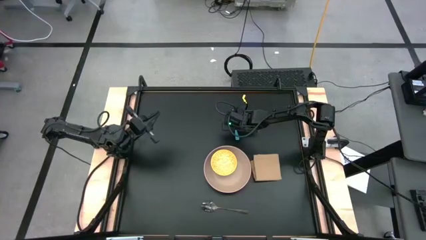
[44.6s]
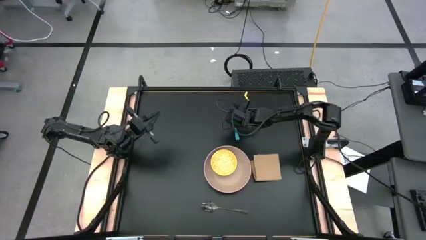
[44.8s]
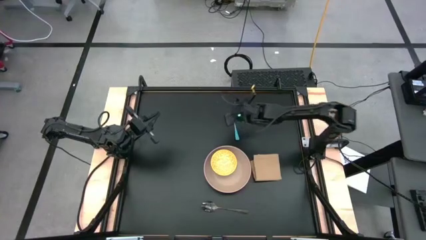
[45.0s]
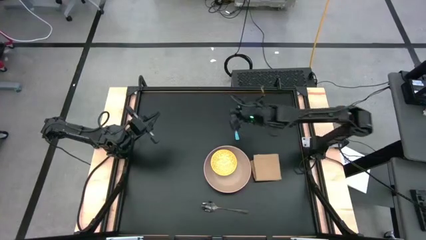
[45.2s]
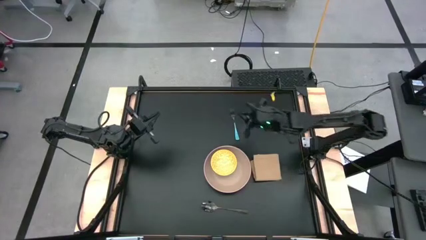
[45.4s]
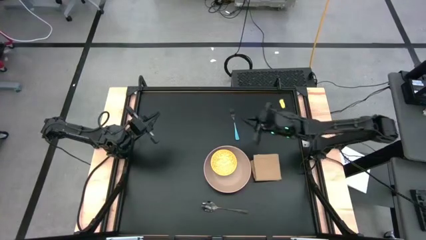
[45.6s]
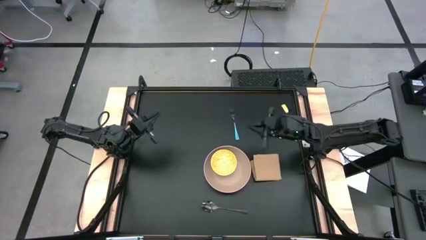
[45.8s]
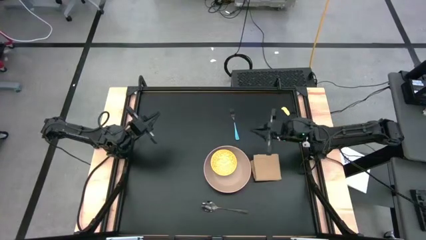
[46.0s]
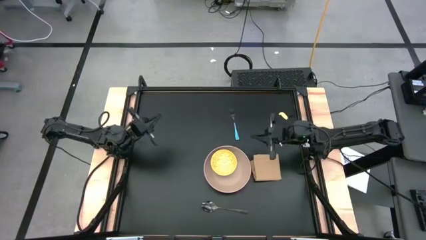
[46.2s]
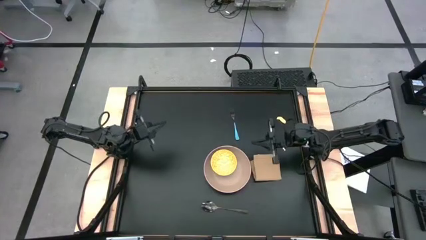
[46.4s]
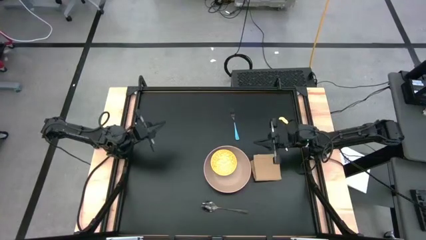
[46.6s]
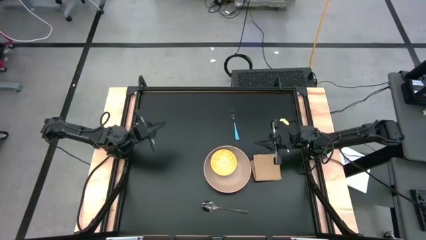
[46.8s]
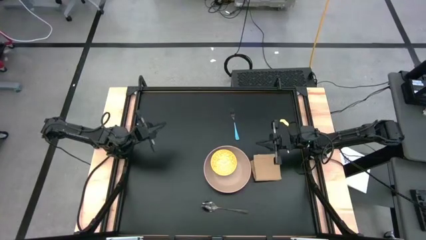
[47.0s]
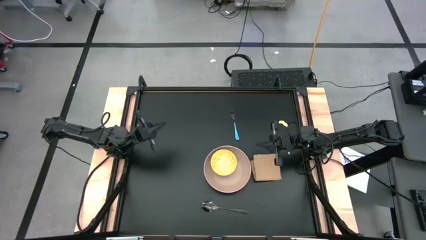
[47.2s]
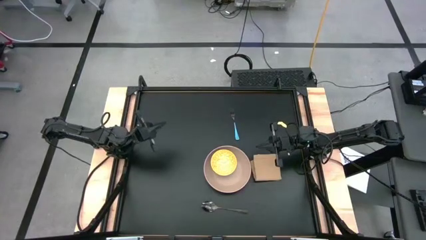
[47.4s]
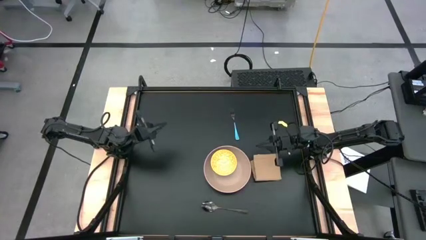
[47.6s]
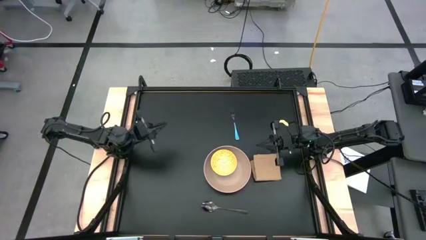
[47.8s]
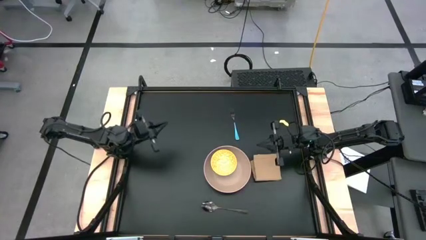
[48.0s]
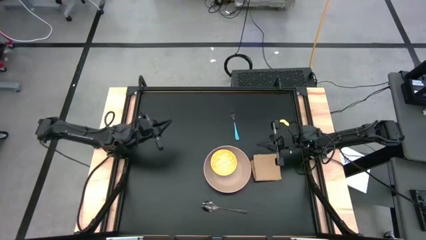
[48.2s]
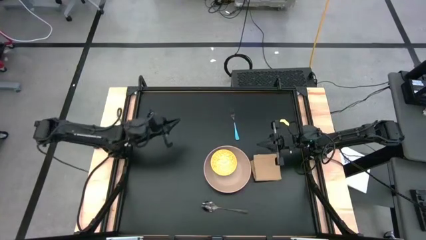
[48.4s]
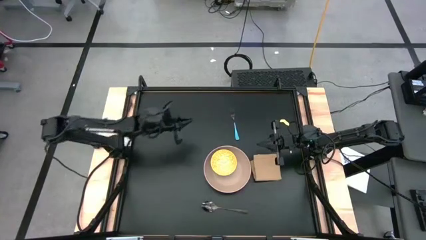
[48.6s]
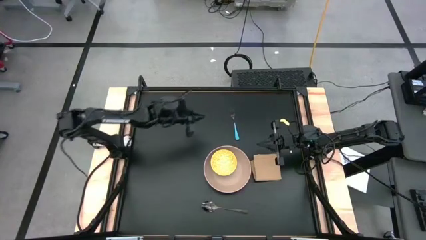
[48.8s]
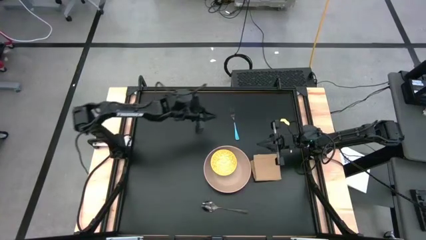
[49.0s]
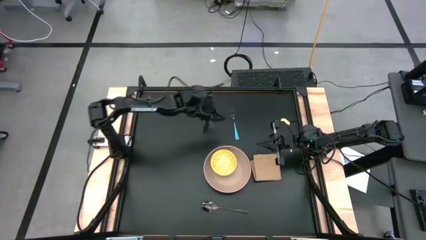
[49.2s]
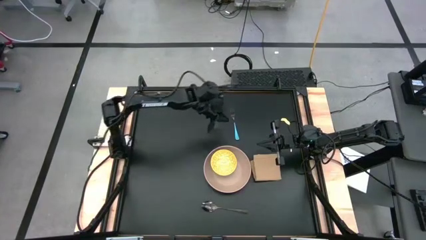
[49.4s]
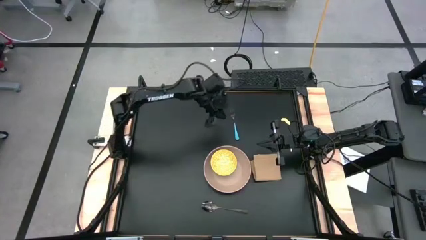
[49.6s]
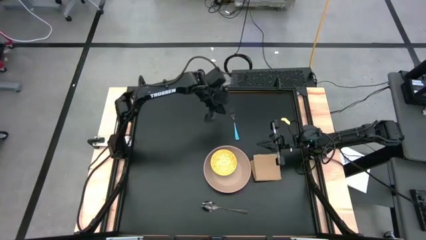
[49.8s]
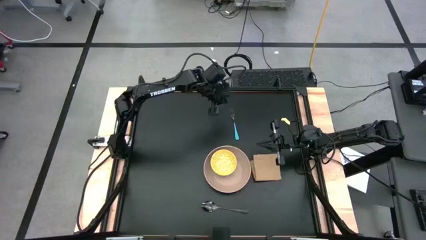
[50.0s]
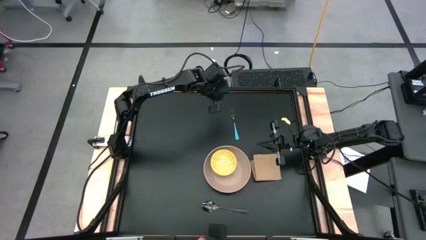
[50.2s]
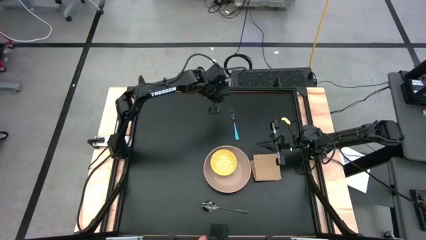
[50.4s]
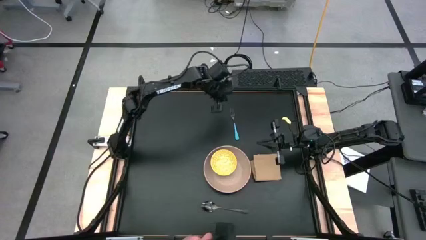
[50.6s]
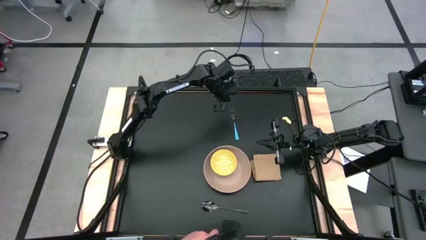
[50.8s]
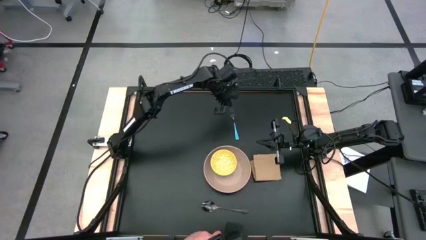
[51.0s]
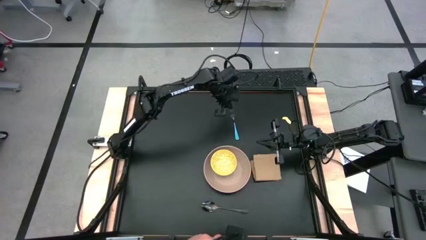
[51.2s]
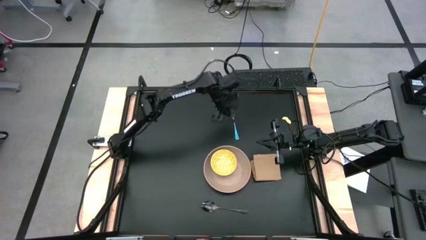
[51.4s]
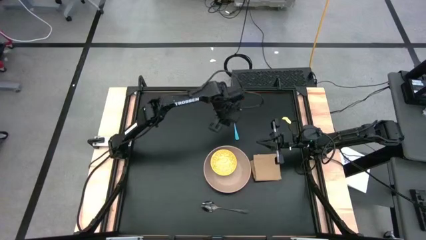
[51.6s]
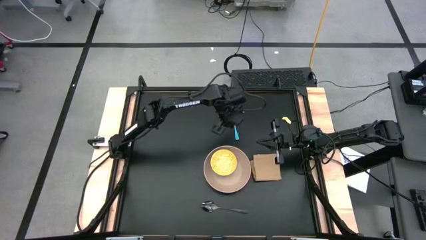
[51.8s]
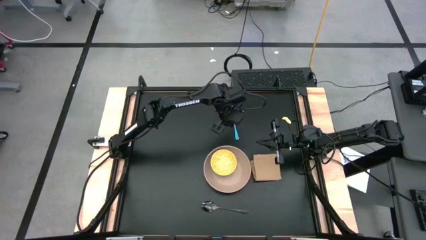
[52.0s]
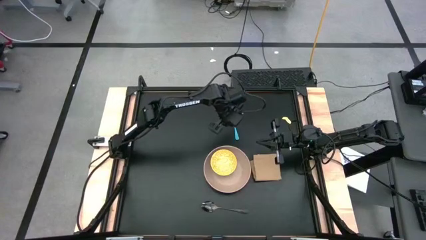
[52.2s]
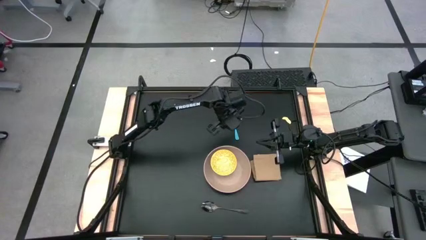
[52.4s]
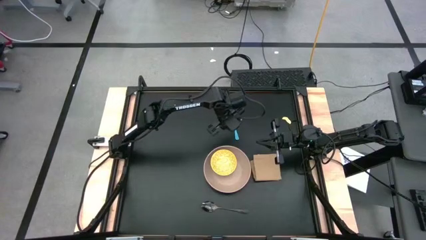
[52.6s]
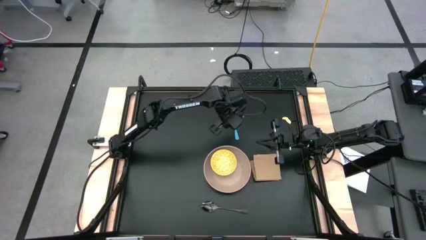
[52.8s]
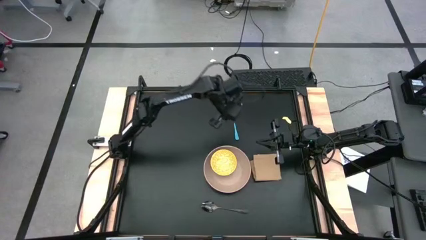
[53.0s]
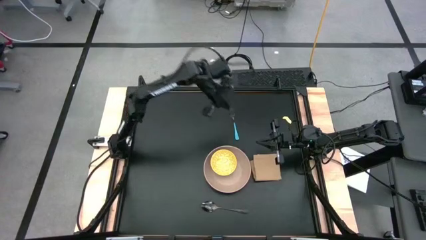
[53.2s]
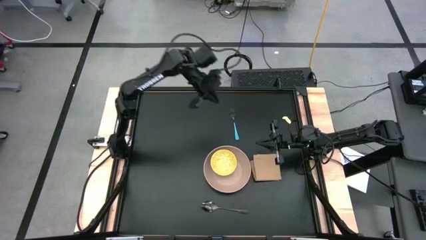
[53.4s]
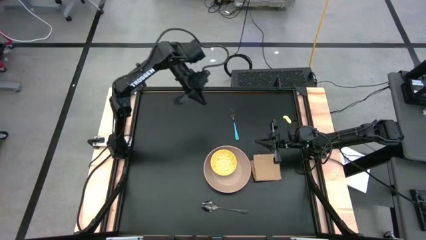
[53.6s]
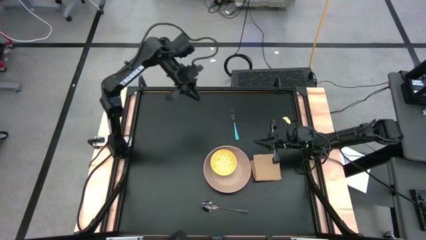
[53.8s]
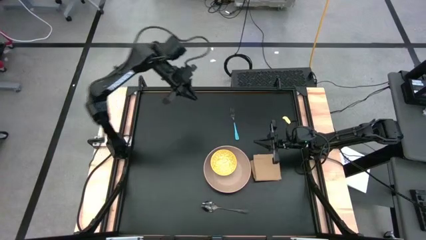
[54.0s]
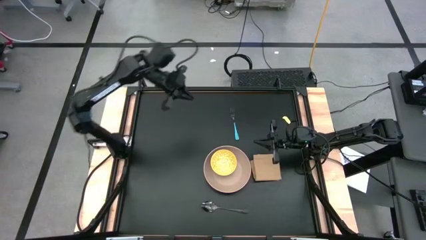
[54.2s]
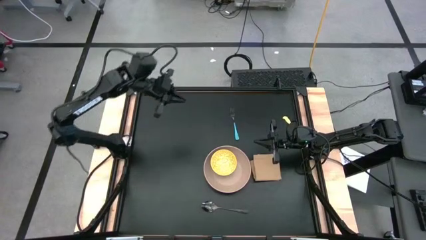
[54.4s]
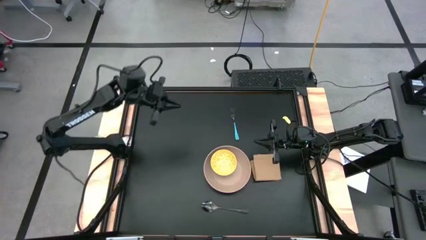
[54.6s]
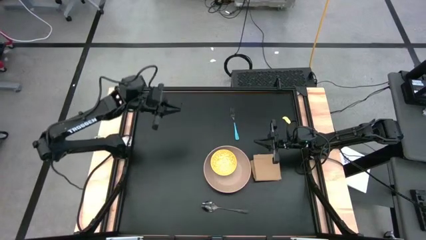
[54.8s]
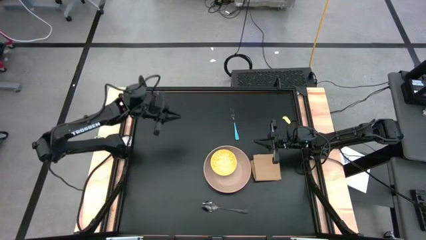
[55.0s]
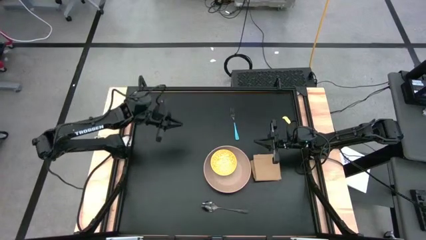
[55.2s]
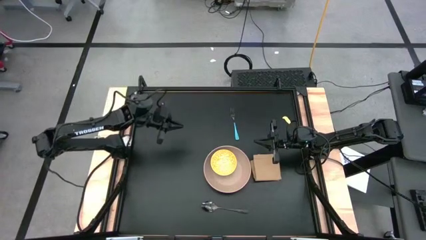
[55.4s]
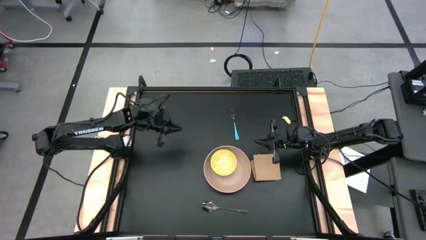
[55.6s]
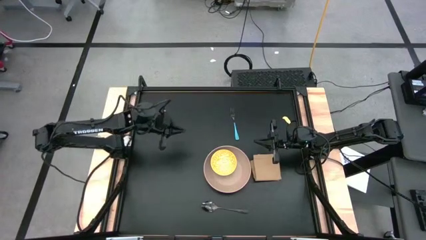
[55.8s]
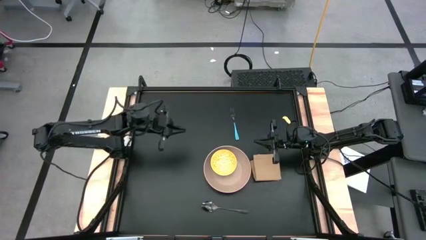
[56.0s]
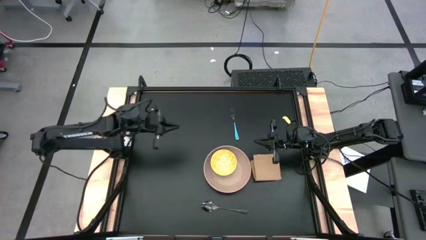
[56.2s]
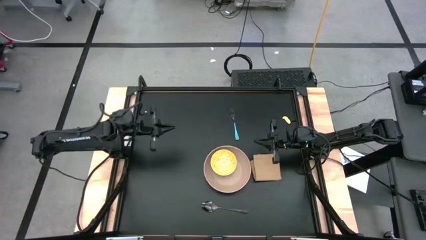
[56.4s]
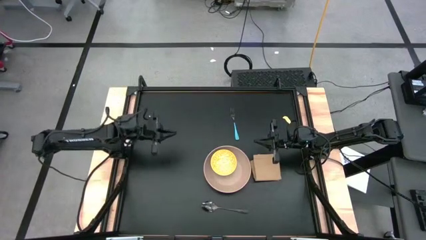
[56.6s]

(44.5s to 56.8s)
Task: Set table place
Adjust the brown plate

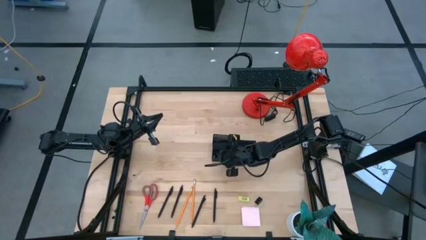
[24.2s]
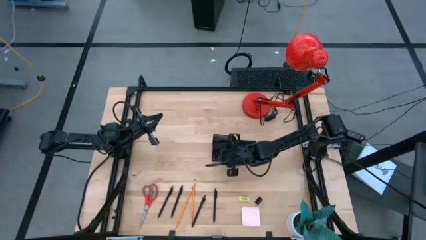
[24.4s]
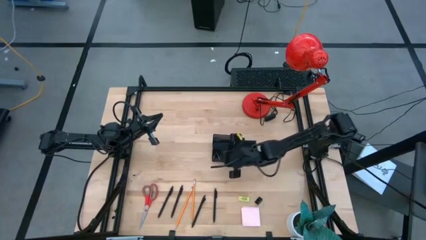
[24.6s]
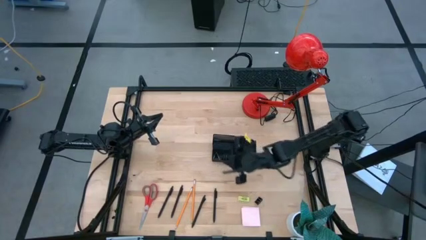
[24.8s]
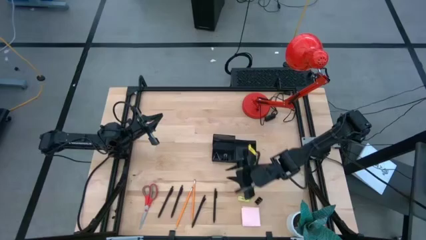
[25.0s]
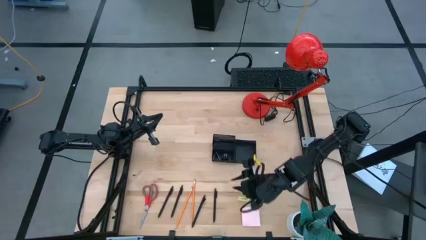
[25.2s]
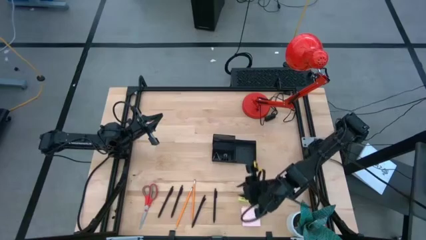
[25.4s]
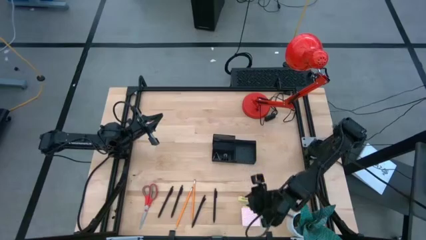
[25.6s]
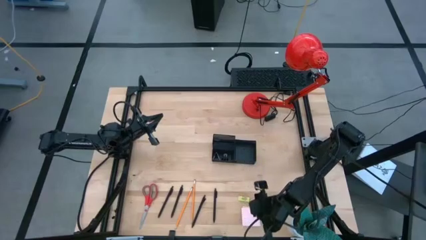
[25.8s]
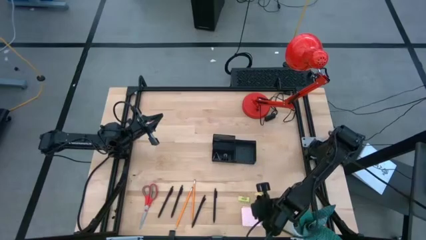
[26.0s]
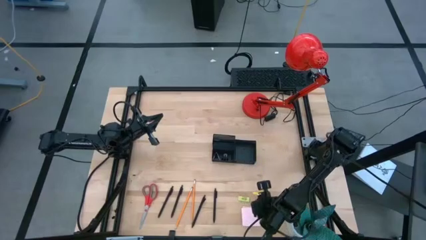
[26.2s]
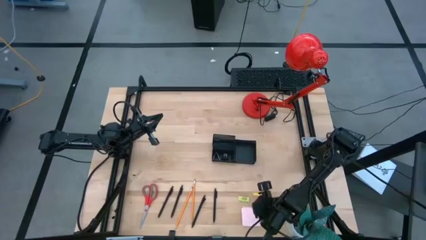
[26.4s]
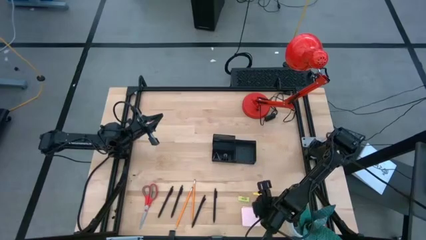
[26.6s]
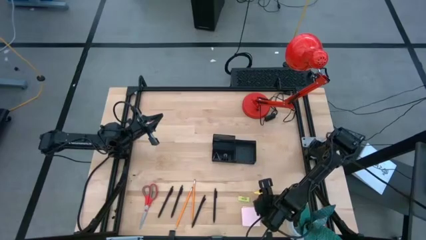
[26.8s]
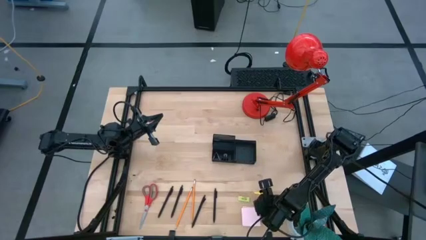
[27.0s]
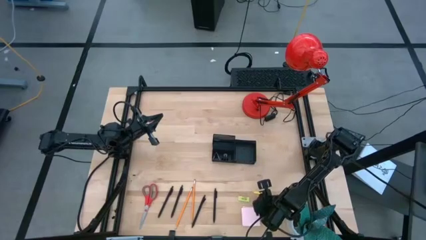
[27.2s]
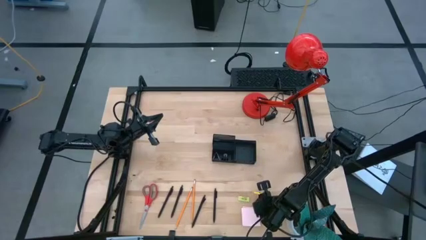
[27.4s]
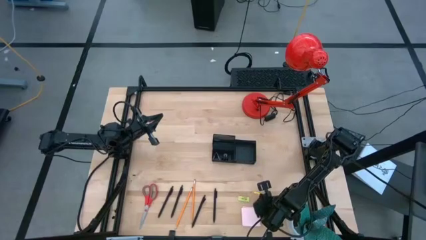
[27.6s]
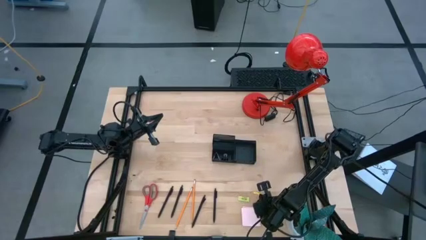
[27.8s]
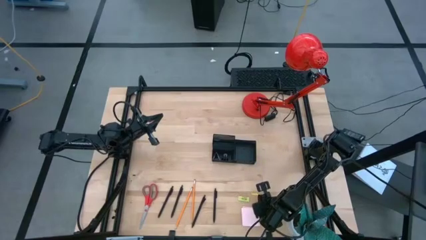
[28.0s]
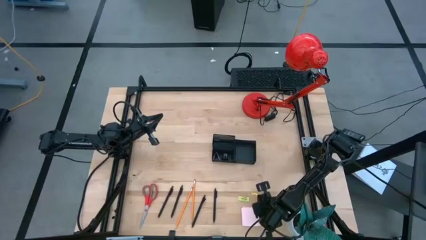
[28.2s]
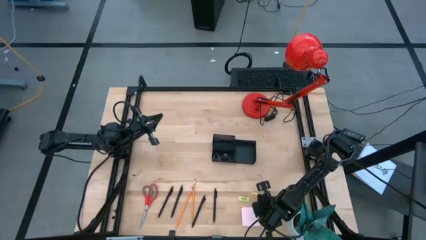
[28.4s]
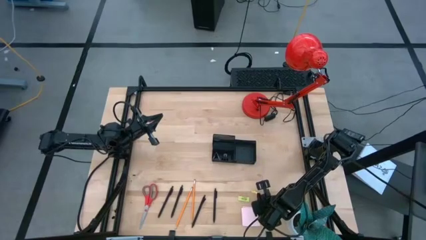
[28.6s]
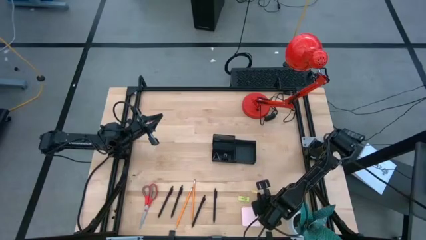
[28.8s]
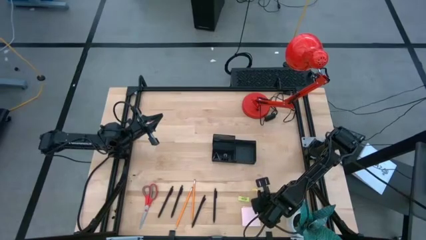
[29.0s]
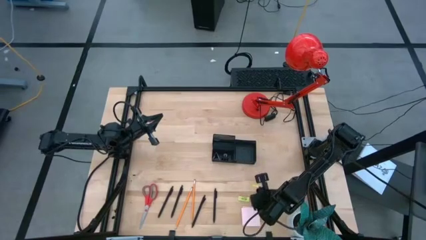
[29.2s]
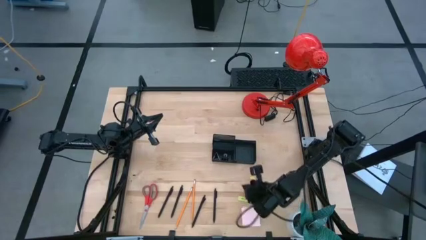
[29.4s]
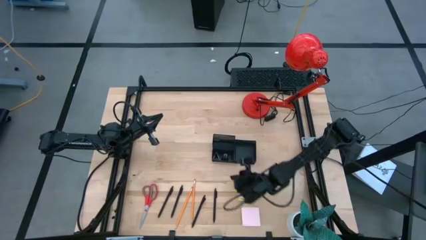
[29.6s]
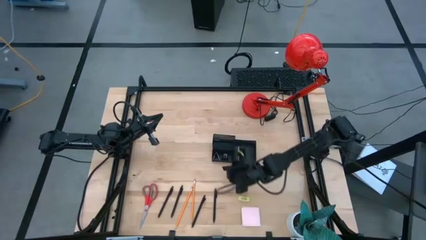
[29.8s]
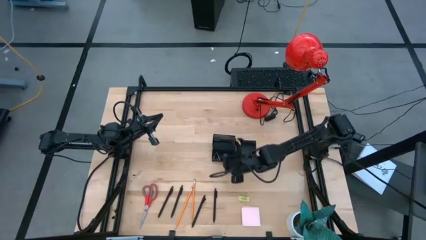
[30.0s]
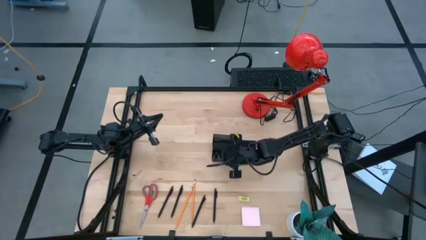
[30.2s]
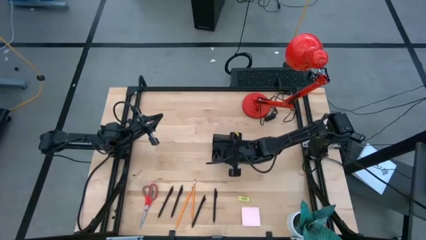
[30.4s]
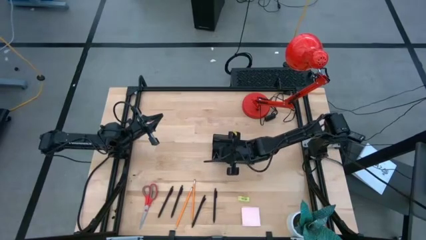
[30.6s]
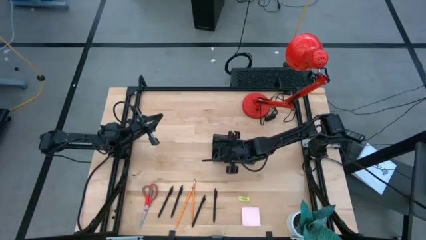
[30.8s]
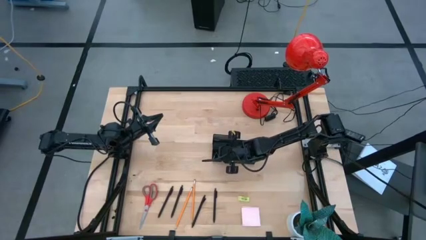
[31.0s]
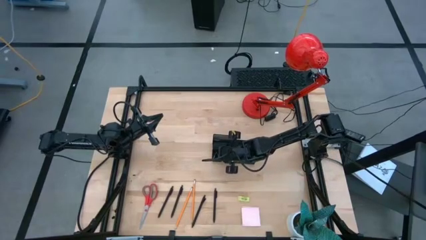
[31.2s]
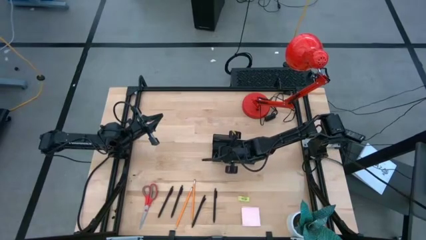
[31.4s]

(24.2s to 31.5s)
Task: Pick and place office supplies into organizer
Put the black binder clip into the black desk organizer
